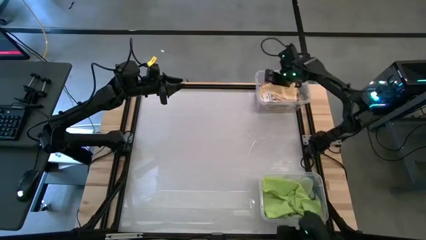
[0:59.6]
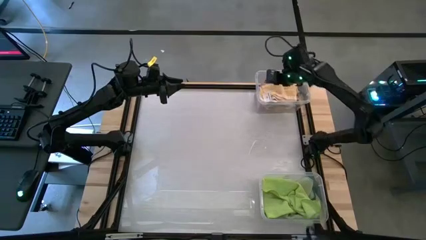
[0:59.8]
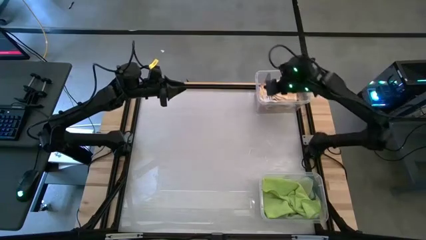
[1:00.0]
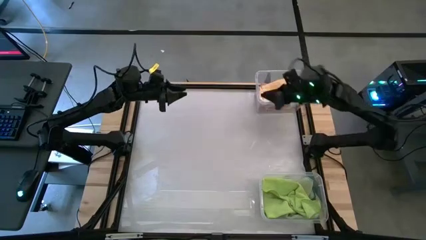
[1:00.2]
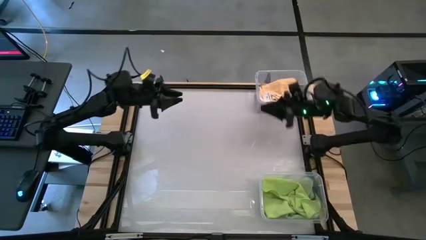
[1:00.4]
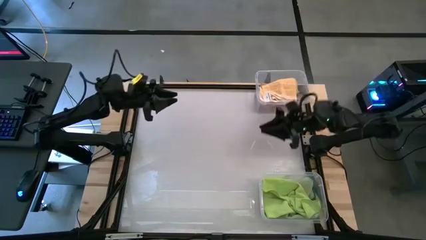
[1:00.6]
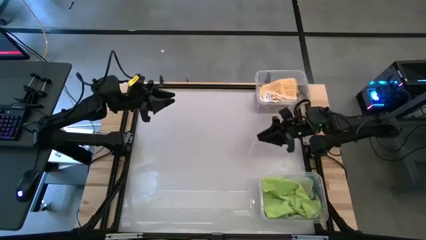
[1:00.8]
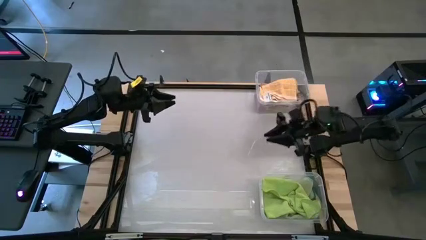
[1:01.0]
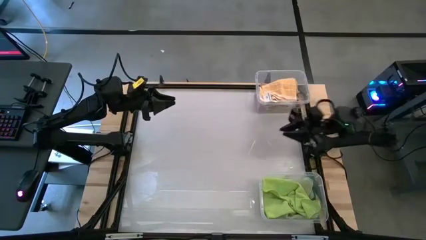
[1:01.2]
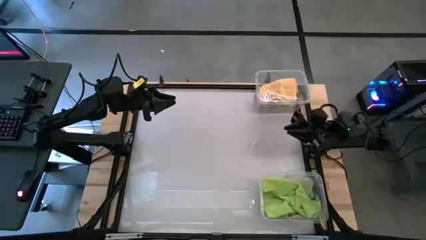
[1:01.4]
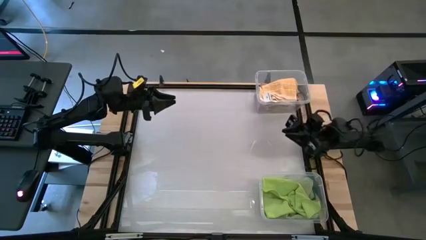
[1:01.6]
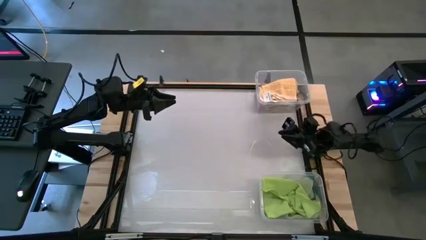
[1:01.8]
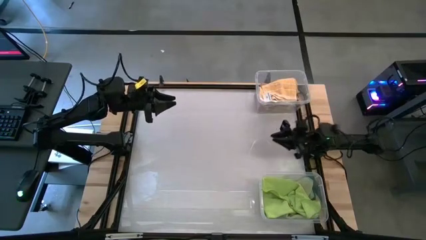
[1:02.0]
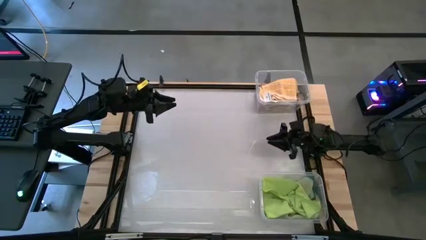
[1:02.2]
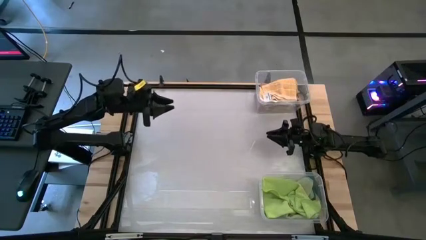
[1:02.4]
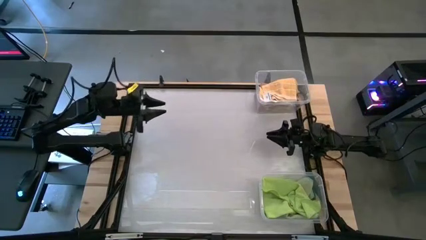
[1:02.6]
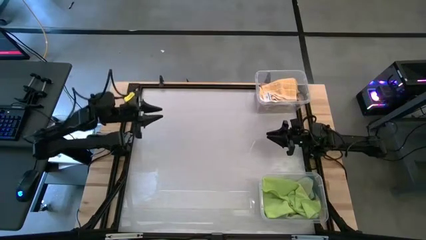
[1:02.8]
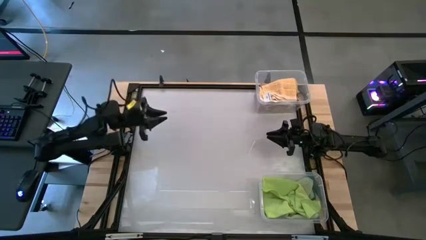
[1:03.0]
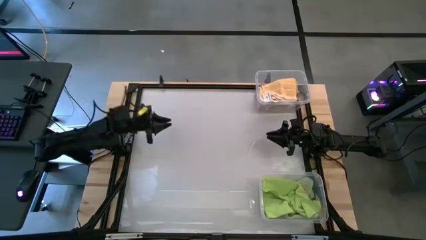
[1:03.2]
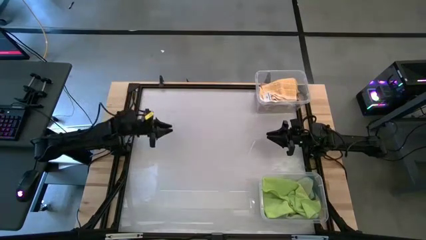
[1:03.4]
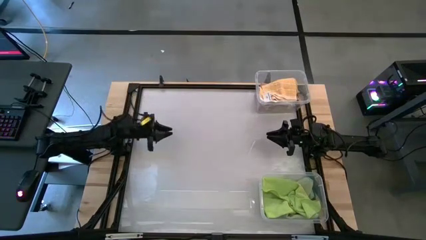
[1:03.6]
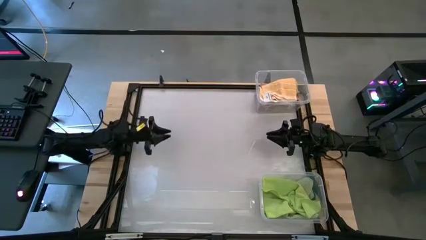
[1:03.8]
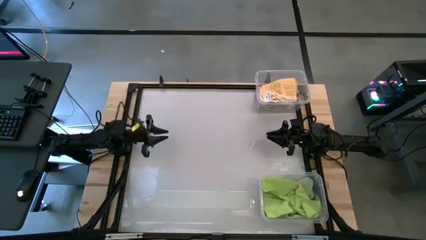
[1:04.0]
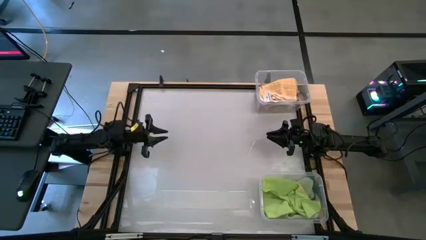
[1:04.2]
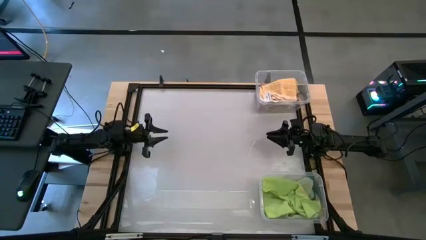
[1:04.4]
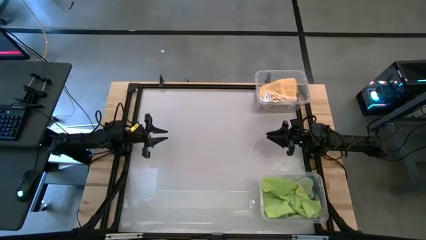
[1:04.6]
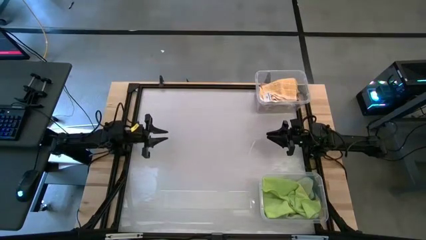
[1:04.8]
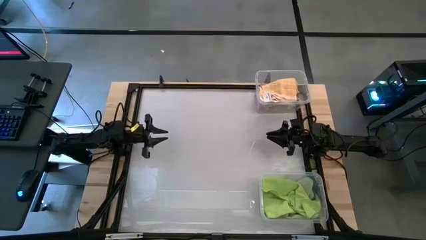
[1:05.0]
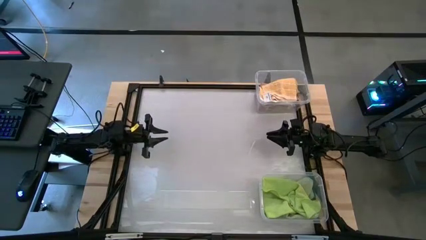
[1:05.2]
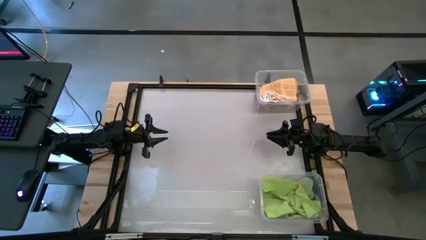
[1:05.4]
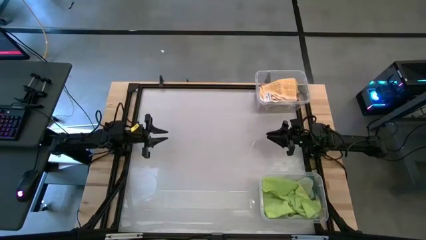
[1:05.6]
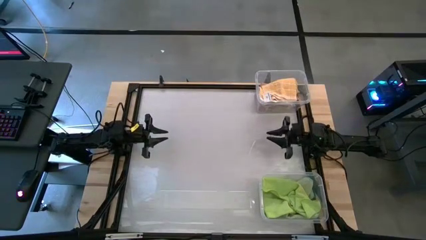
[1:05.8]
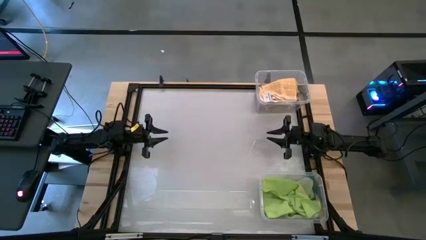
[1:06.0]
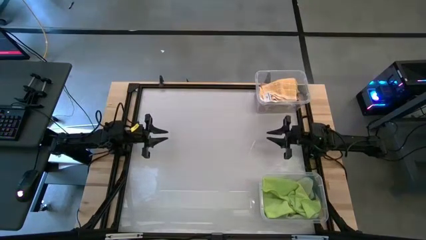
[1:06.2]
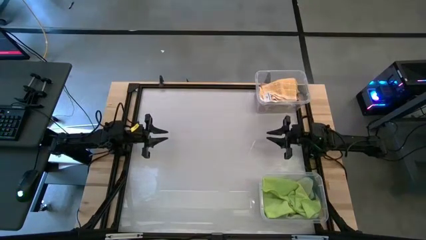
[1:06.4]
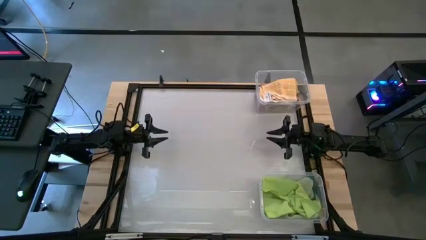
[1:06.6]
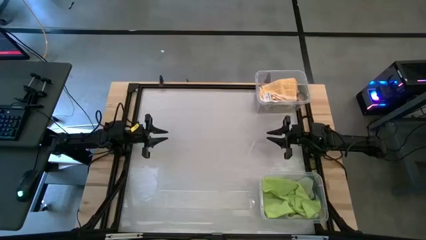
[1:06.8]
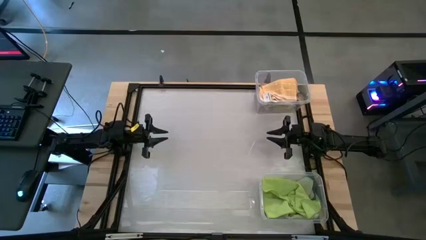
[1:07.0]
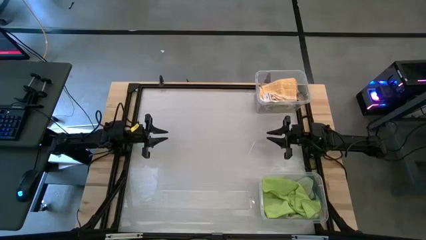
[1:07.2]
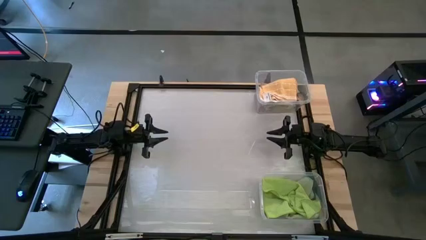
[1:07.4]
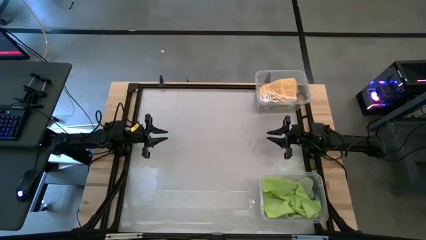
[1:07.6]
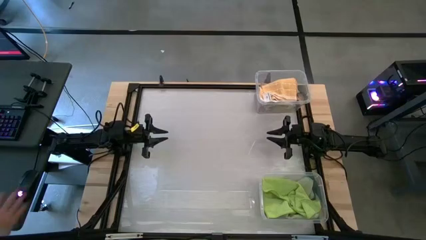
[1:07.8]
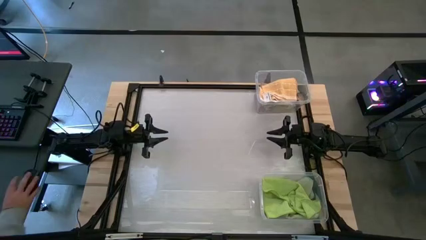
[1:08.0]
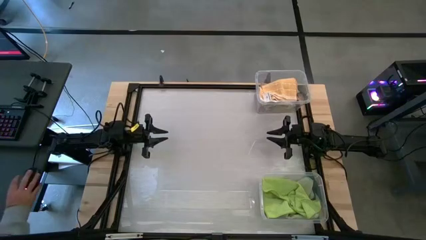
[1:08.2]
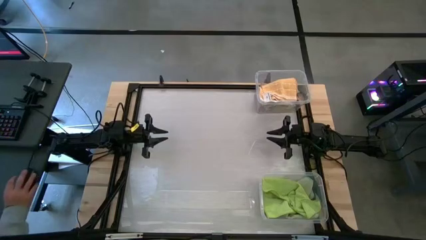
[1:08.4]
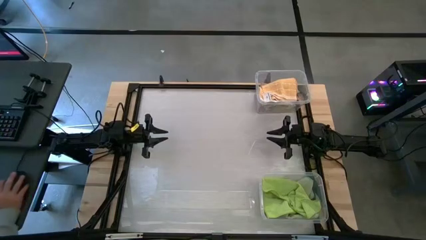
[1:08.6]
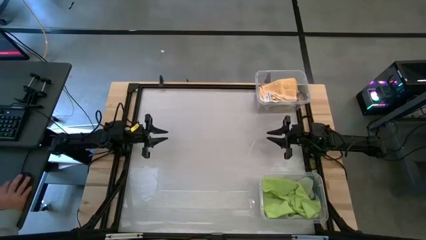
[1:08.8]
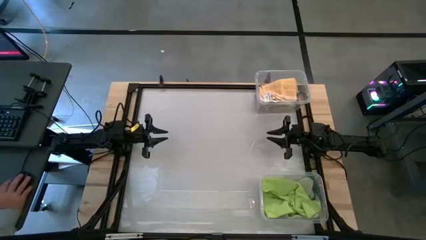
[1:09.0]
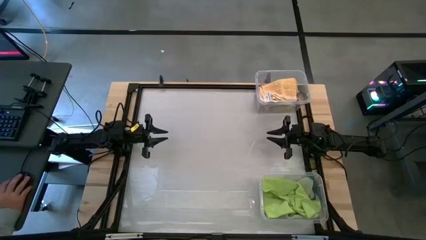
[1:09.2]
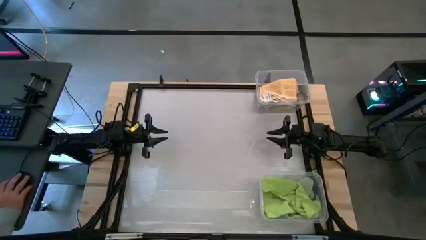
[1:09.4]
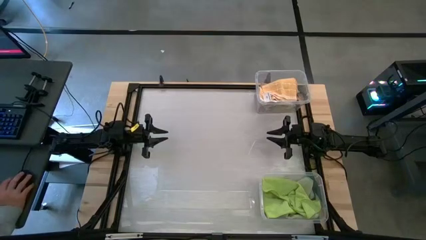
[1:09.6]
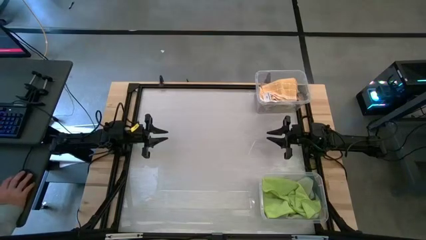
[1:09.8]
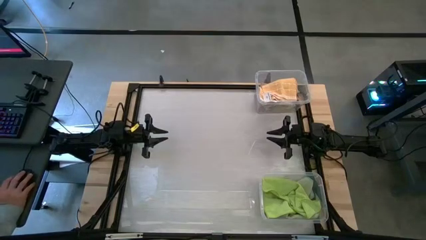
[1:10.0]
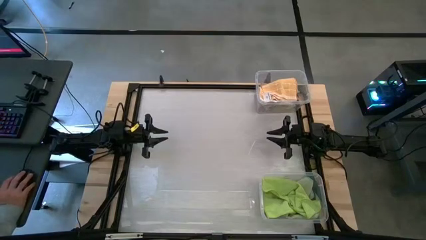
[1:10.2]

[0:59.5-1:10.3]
Task: Sort microfiber towel by color & place in baskets
Return to Home Position

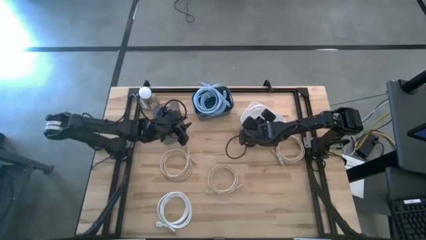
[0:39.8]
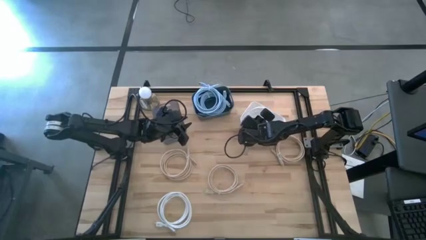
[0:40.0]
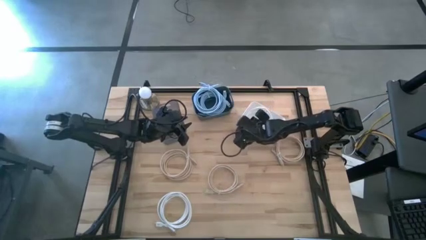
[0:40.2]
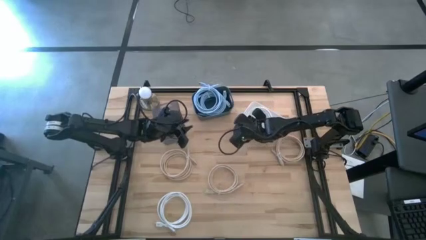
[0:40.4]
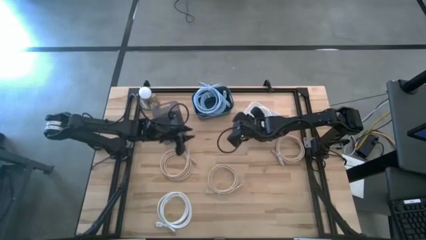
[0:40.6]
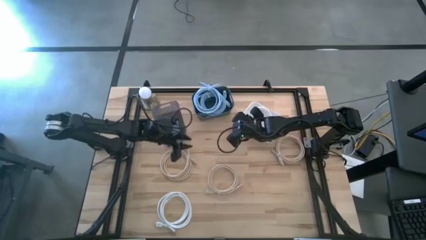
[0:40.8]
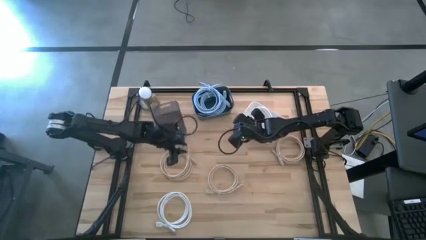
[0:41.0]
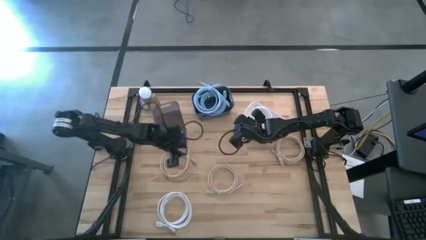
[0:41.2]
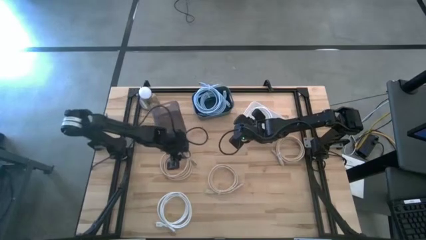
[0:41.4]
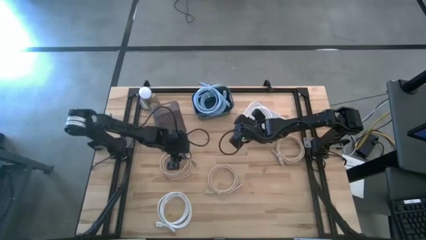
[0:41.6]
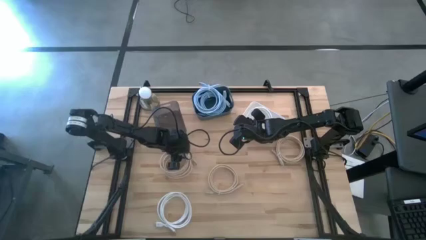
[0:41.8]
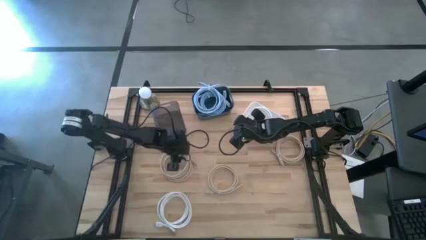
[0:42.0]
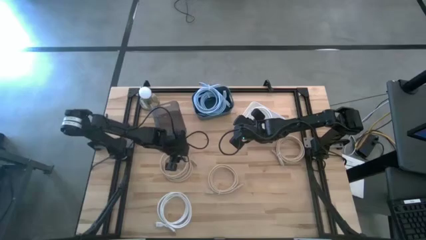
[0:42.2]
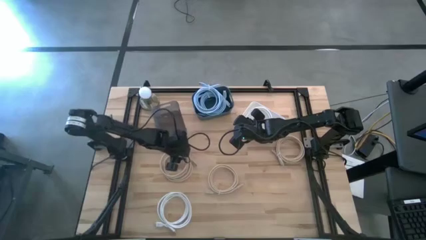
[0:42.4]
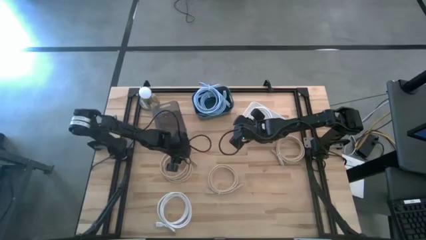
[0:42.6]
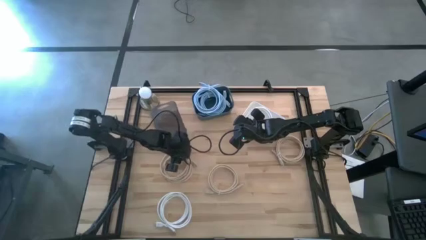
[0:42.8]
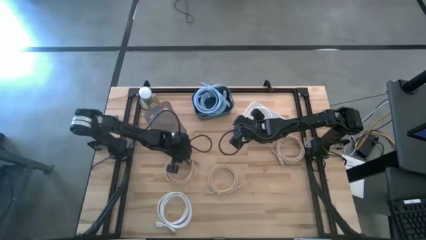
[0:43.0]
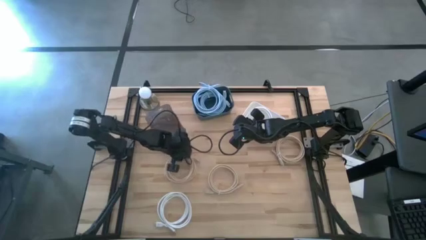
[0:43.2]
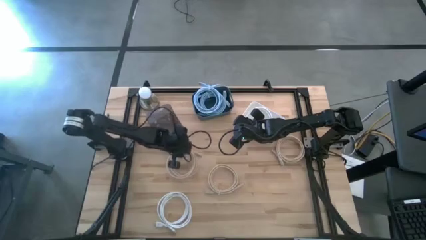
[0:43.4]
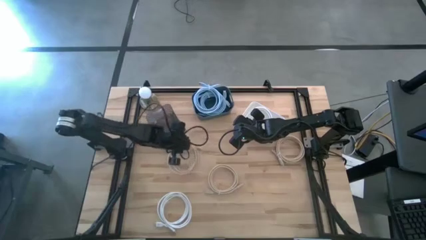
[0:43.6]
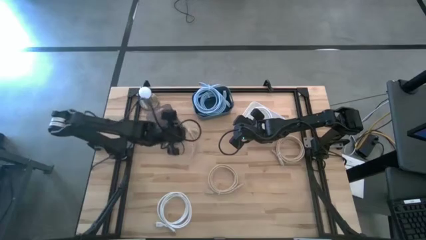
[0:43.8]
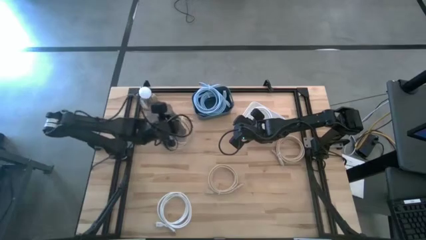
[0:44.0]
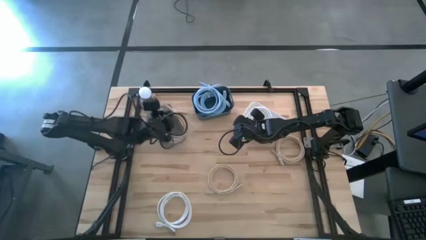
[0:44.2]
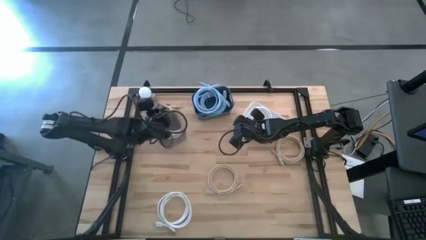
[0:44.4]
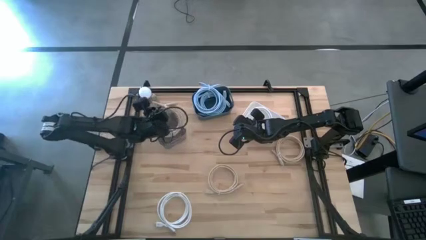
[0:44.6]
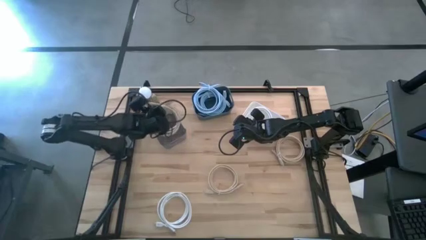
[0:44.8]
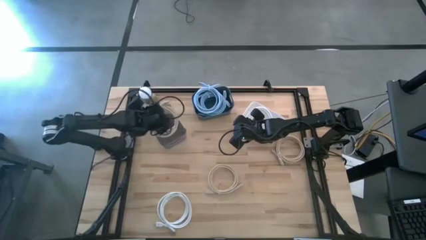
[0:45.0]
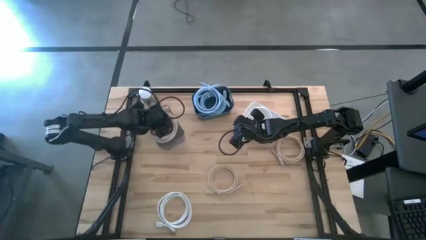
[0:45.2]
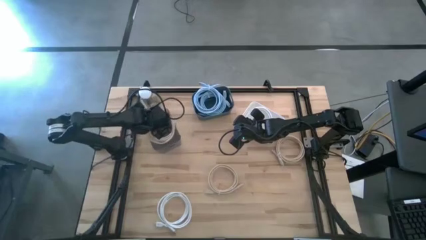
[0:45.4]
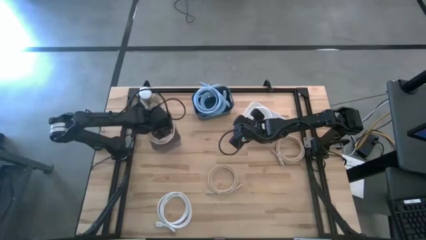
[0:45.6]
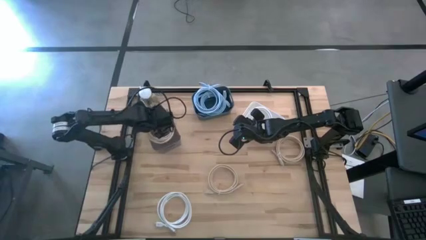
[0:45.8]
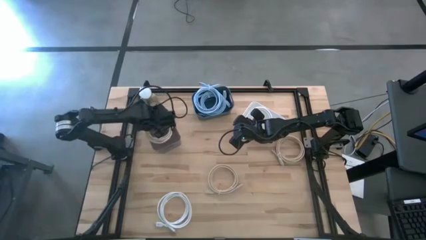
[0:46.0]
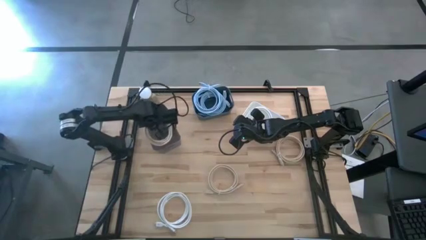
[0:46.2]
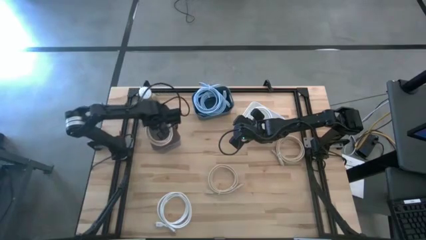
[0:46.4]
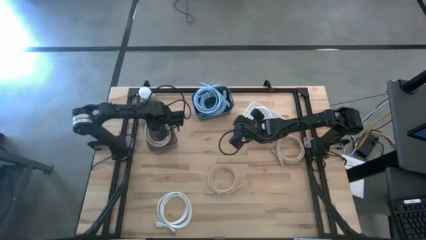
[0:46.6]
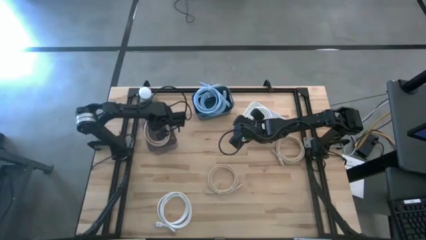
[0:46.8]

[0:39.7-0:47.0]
Task: Sort HDMI cables
Put the left brown HDMI cable into the black bin
